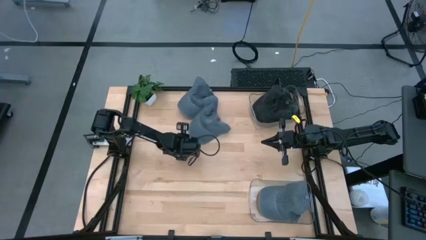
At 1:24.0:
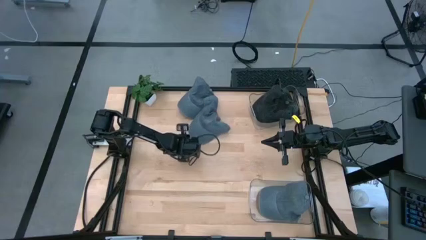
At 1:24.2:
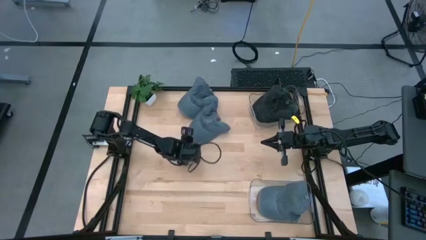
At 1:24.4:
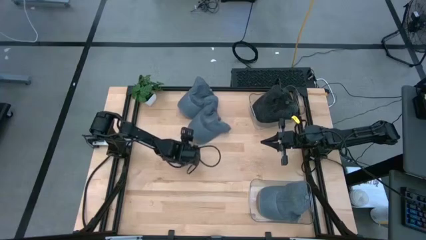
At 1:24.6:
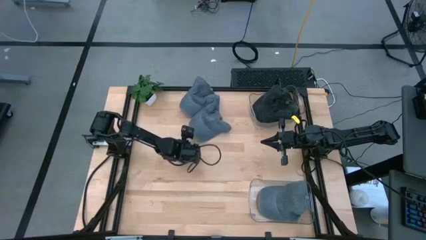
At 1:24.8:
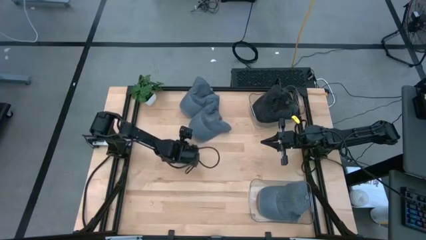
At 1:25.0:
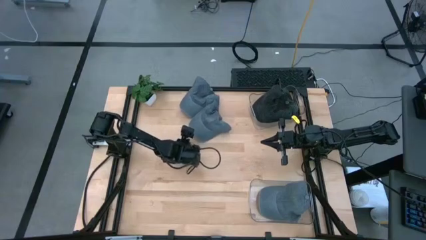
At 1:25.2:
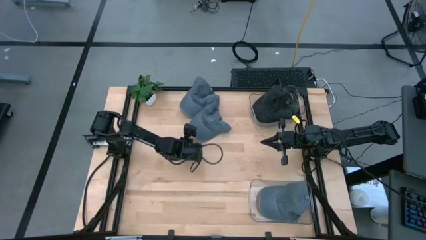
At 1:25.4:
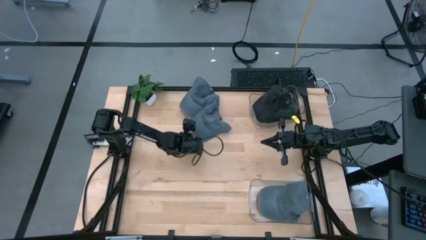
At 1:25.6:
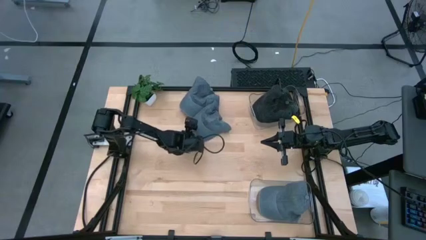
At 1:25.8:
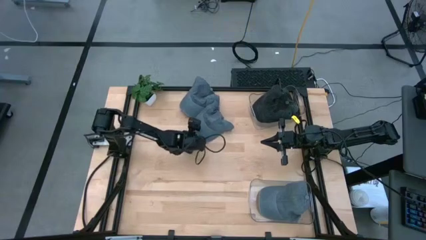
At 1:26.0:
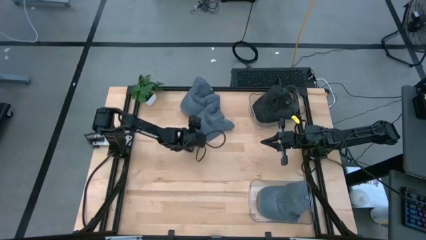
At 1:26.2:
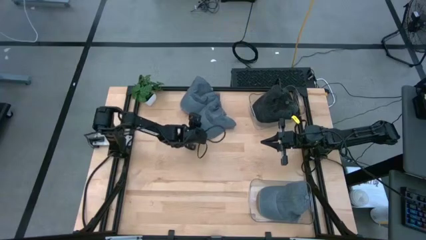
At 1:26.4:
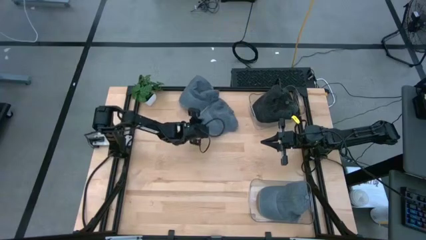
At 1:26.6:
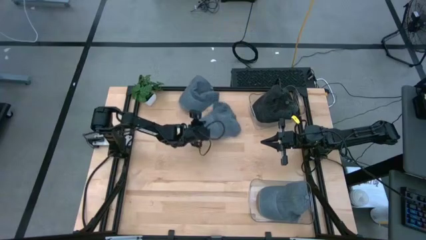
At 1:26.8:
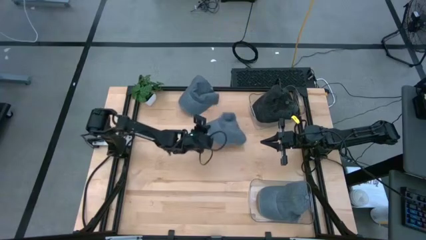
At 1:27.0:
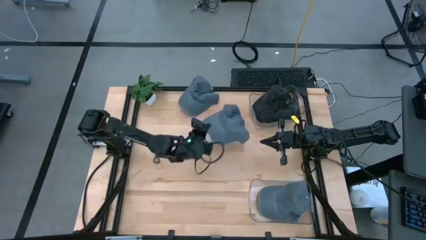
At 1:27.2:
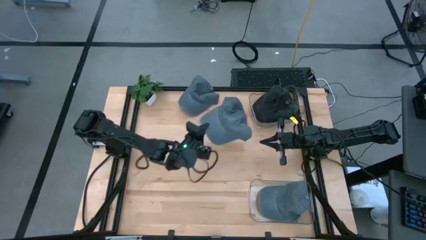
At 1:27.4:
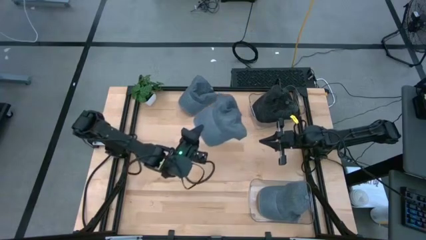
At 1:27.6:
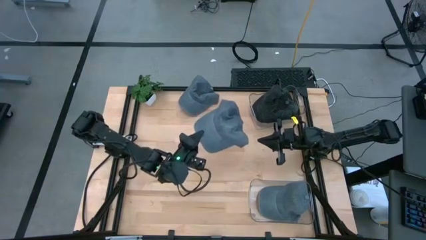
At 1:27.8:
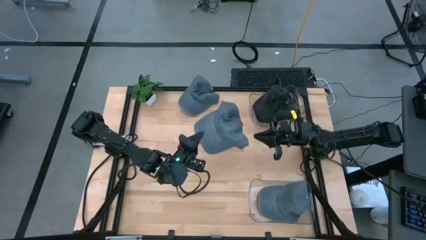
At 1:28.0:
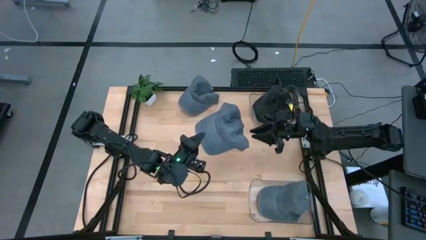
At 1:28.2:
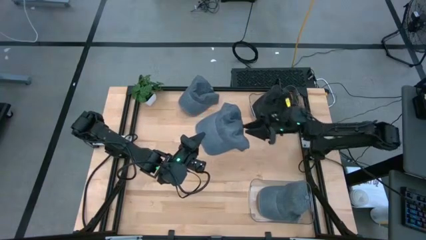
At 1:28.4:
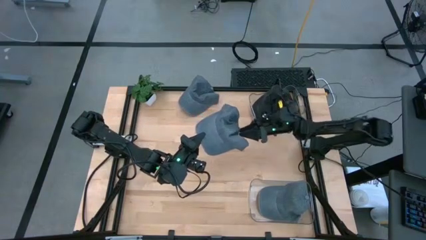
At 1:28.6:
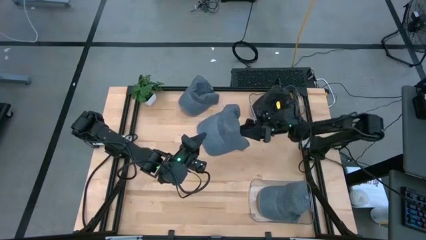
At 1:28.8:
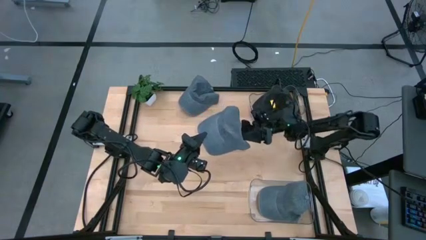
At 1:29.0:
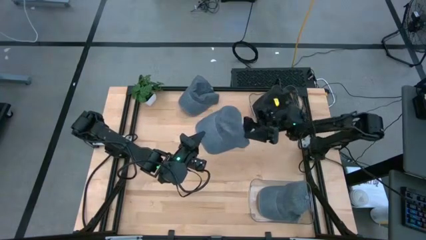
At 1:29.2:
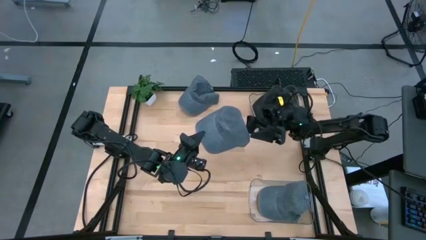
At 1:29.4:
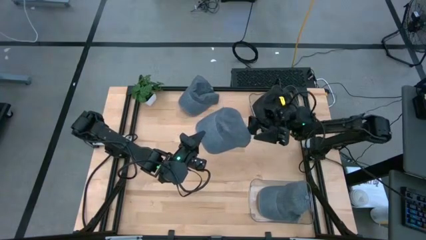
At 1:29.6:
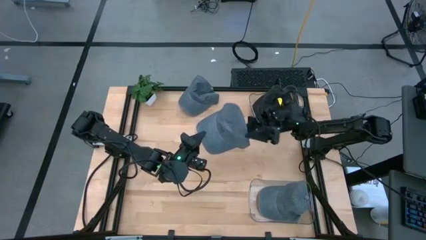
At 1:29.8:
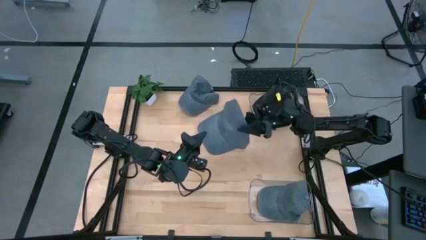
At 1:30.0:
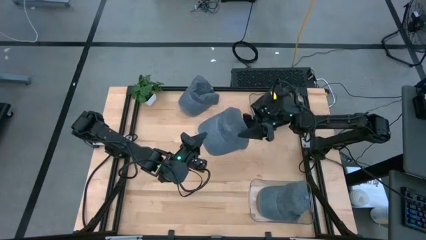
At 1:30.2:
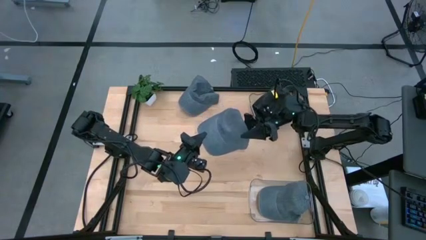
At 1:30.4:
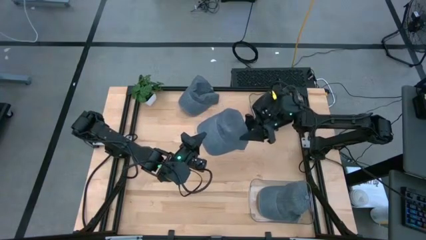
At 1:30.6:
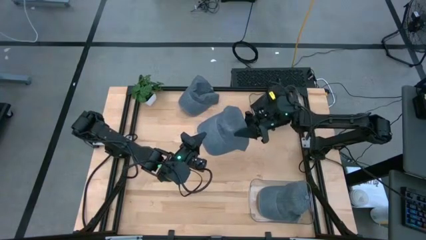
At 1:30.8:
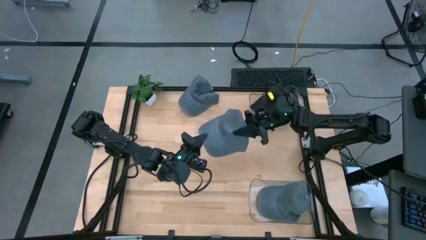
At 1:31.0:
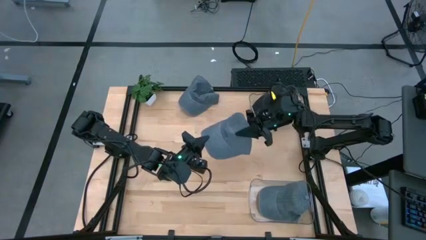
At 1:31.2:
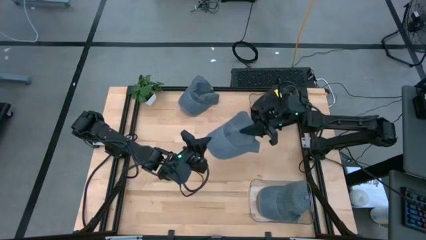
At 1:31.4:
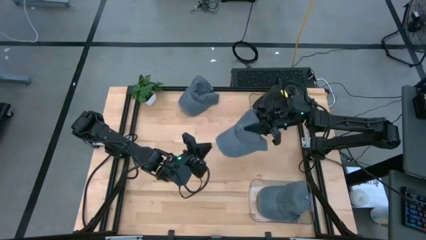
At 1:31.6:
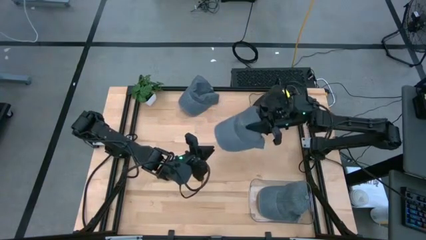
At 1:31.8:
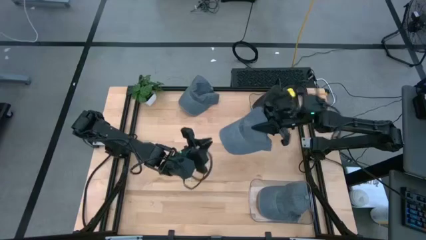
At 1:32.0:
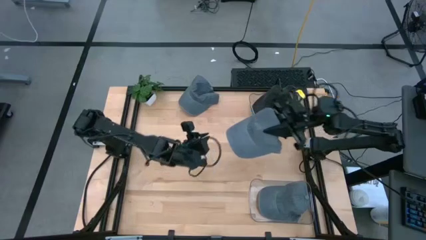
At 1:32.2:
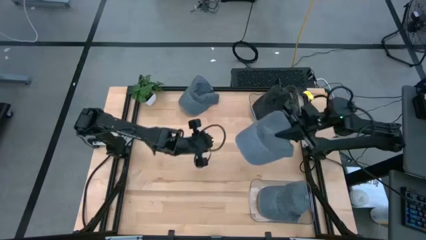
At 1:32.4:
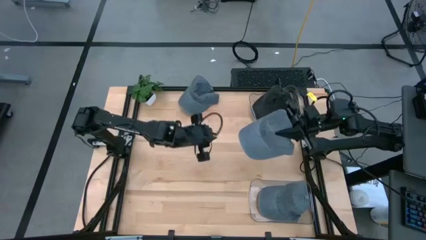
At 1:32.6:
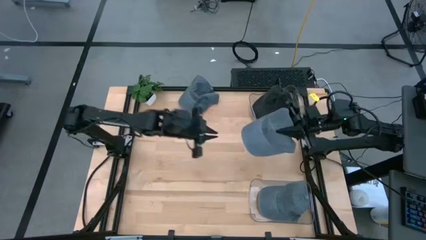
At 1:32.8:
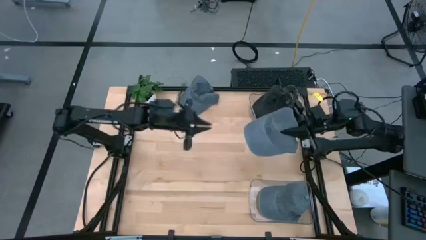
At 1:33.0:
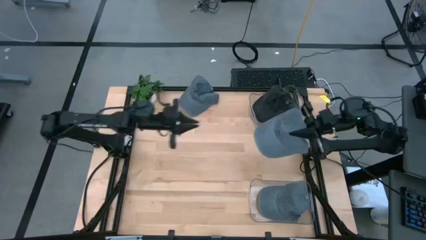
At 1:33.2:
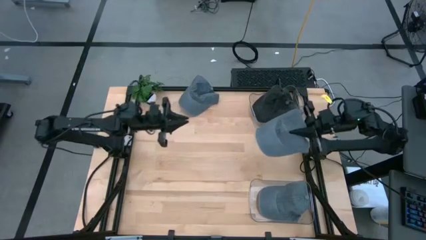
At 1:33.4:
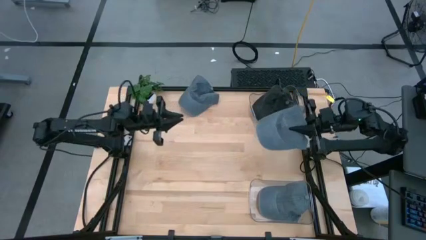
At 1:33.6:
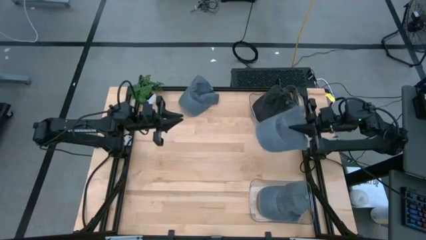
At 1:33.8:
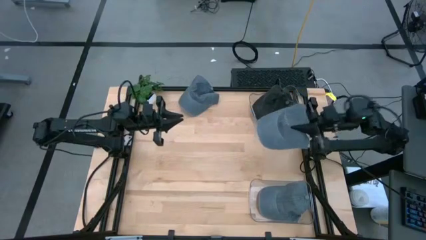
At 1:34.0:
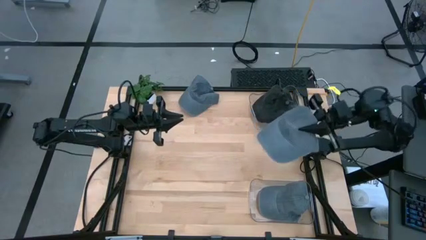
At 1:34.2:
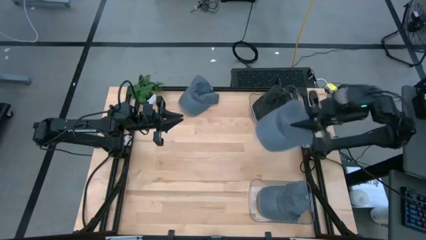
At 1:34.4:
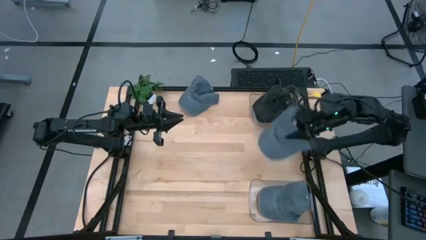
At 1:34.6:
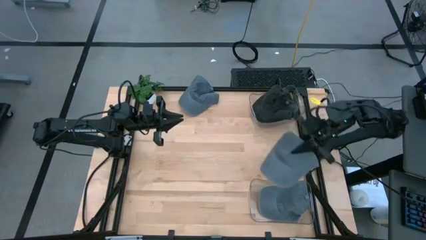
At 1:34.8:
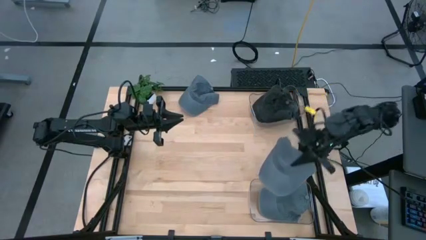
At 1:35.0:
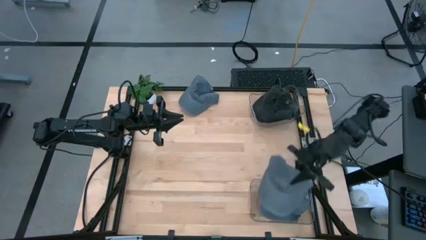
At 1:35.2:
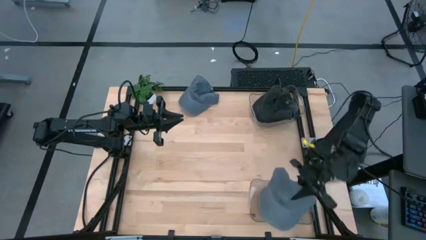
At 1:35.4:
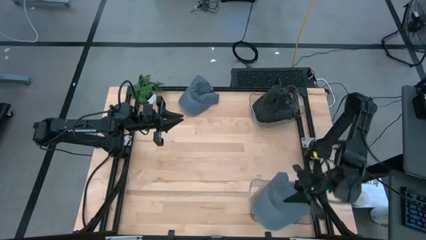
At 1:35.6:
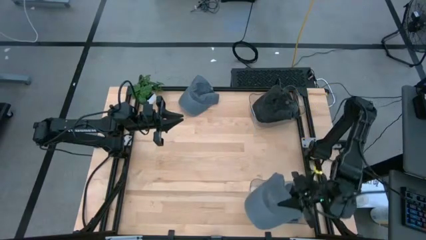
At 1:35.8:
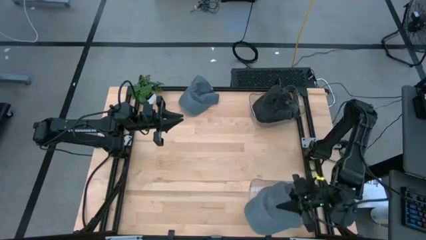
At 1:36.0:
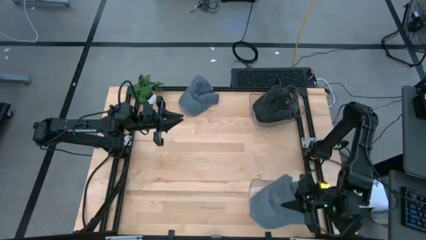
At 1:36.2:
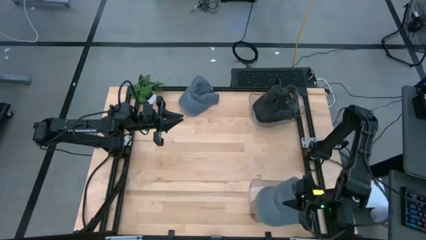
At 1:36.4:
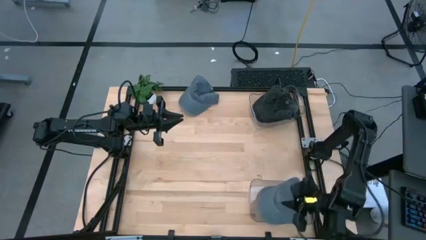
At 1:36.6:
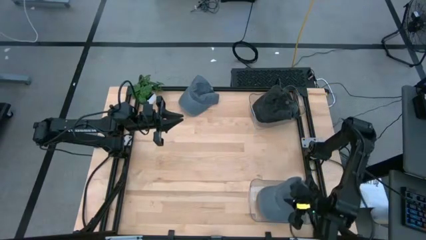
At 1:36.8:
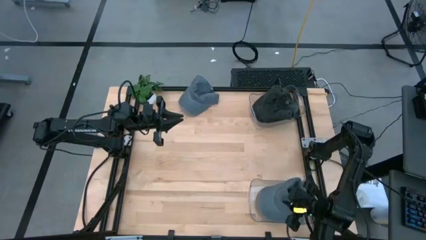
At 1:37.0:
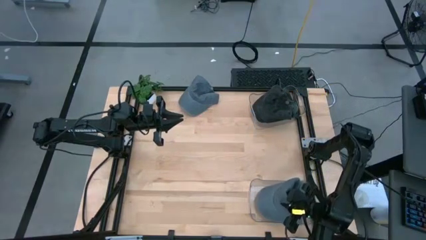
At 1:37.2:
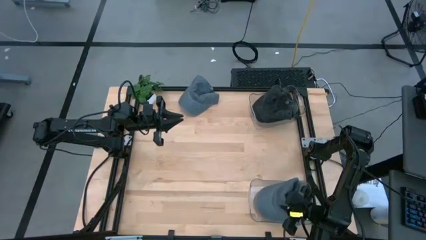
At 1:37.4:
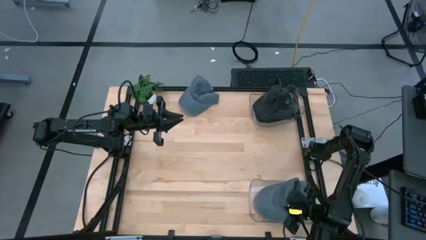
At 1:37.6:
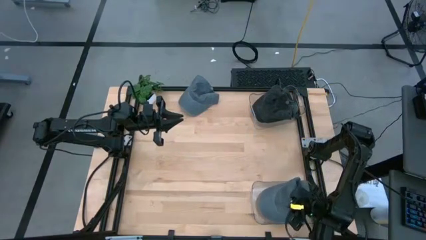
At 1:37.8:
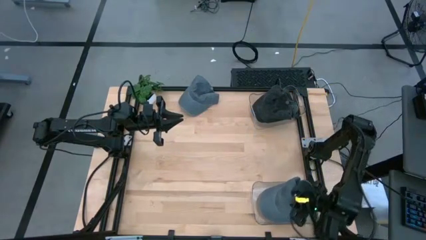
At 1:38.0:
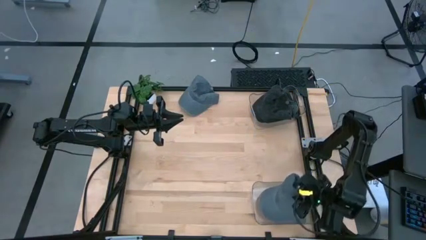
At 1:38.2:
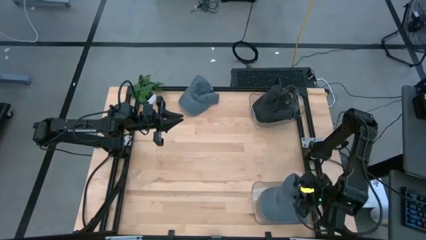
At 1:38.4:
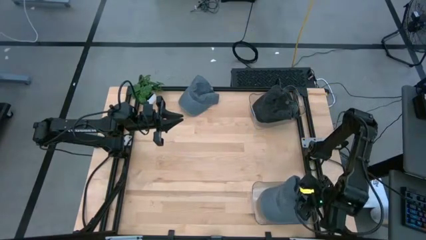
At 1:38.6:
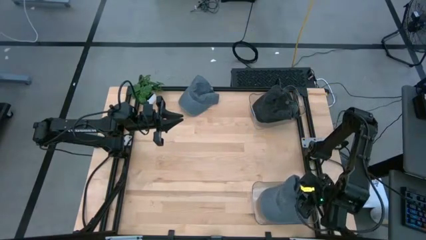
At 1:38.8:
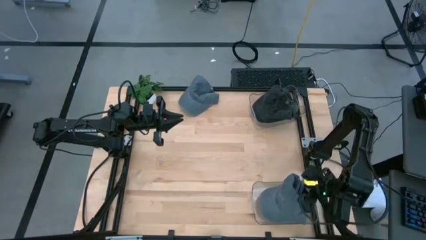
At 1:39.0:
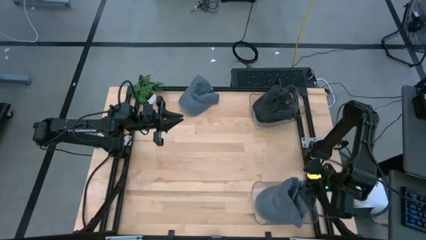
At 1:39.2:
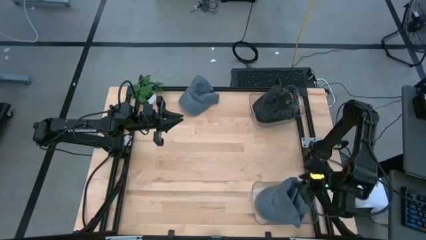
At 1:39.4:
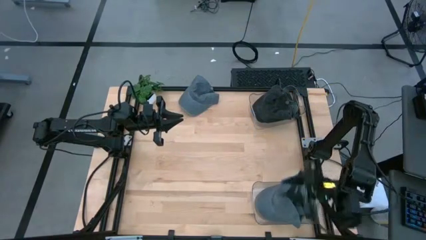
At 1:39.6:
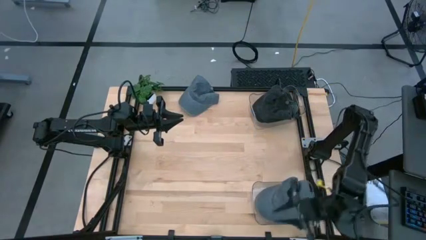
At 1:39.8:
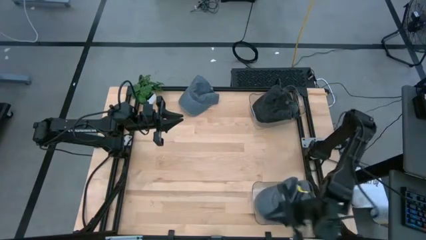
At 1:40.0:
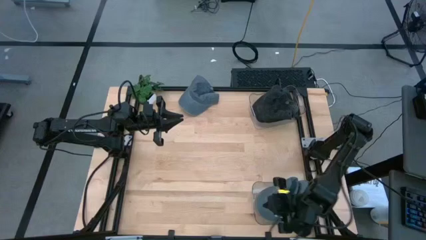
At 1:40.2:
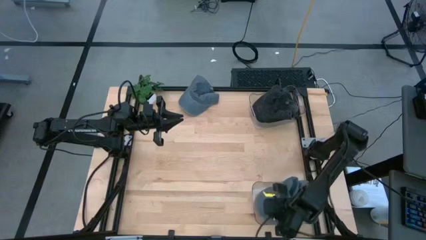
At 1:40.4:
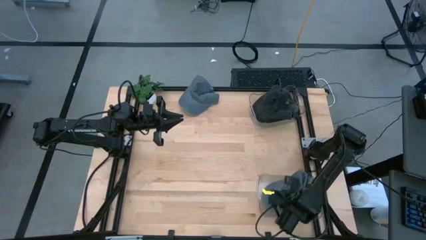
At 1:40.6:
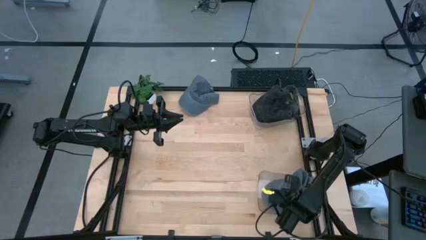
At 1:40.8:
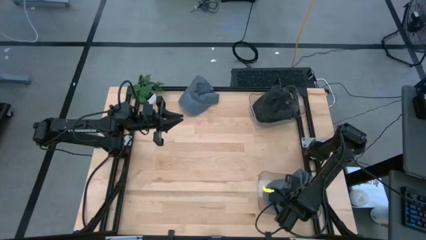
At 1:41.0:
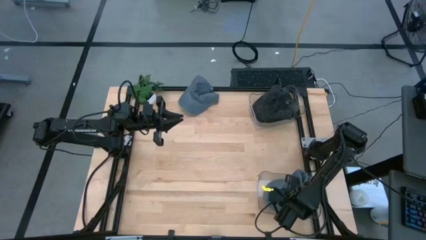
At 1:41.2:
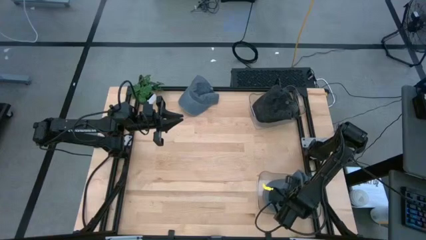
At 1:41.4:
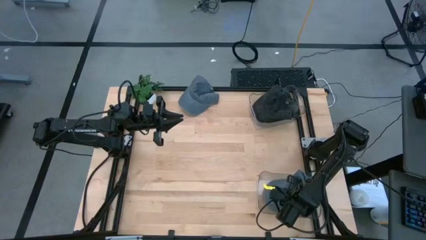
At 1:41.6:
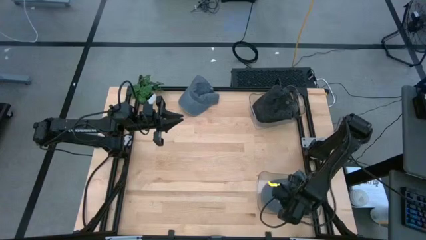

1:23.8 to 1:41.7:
Task: Pick & Place hat
Put the bottom gray cap into the bottom transparent bin
